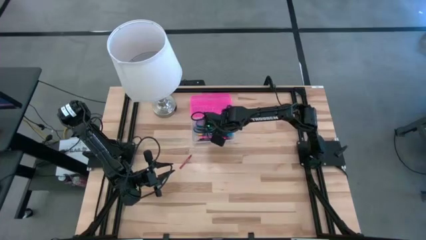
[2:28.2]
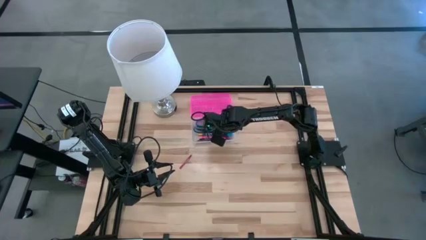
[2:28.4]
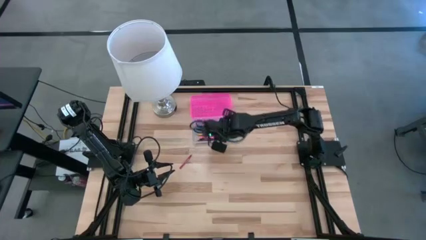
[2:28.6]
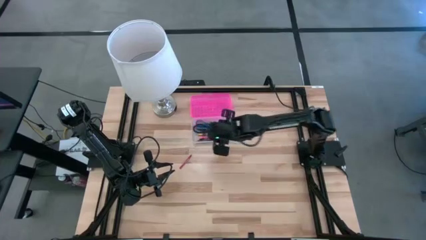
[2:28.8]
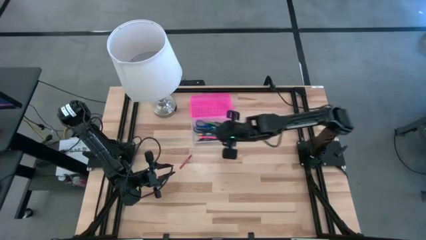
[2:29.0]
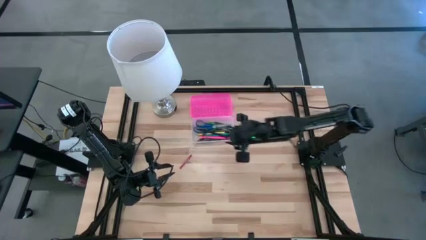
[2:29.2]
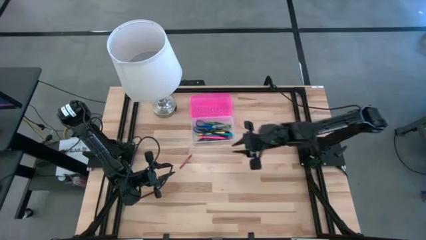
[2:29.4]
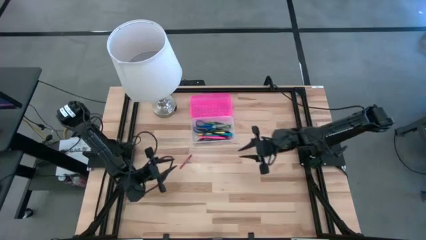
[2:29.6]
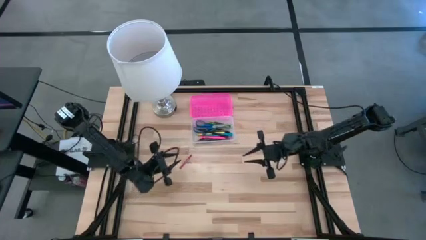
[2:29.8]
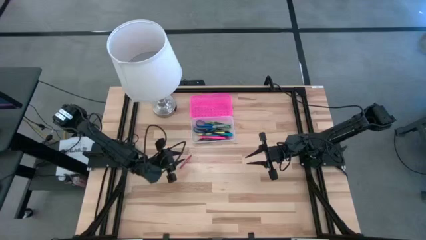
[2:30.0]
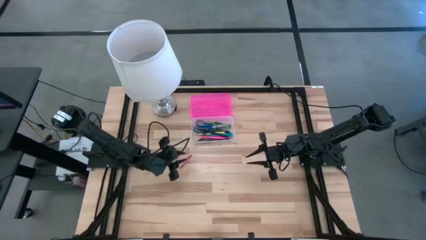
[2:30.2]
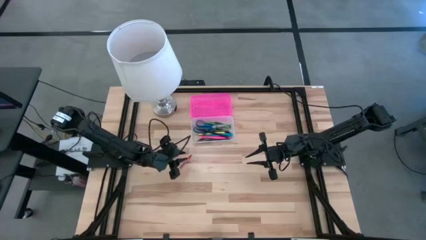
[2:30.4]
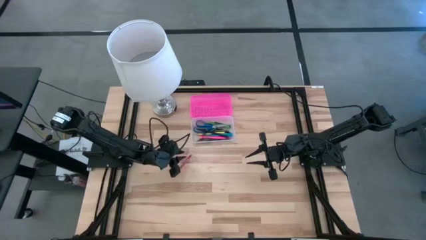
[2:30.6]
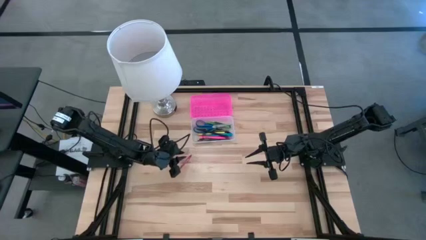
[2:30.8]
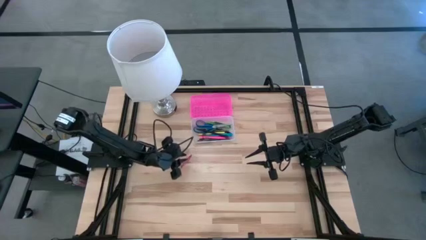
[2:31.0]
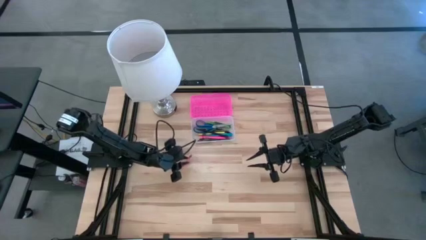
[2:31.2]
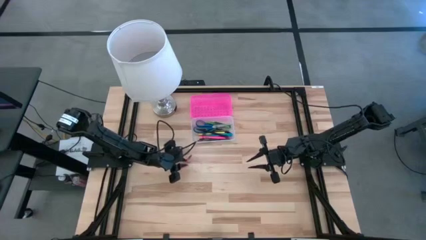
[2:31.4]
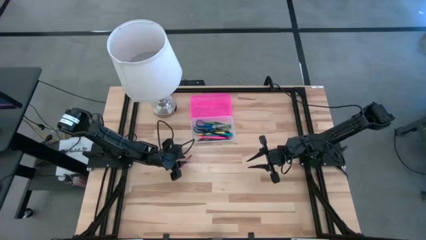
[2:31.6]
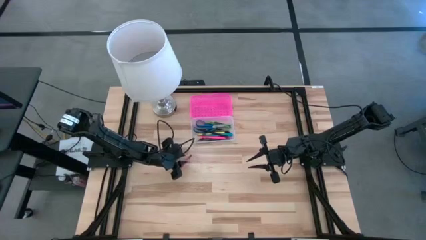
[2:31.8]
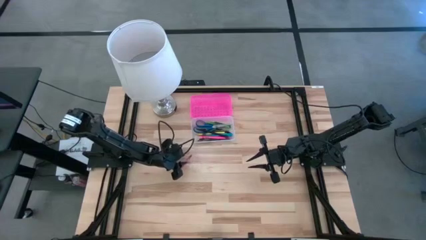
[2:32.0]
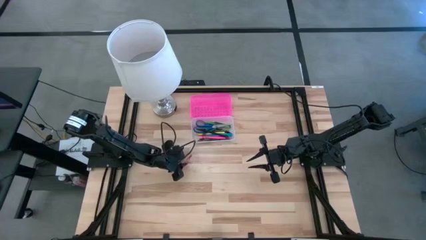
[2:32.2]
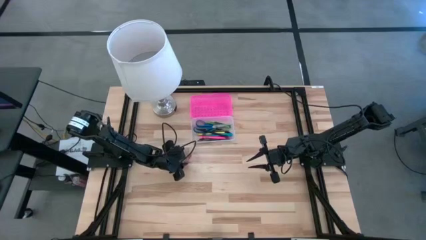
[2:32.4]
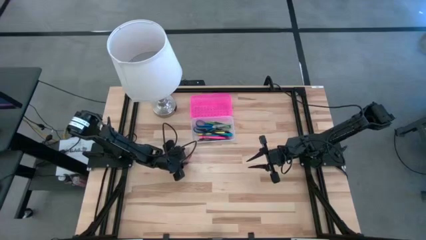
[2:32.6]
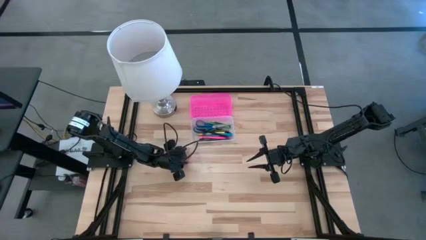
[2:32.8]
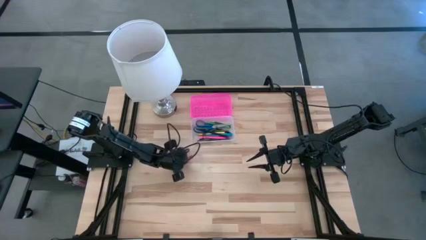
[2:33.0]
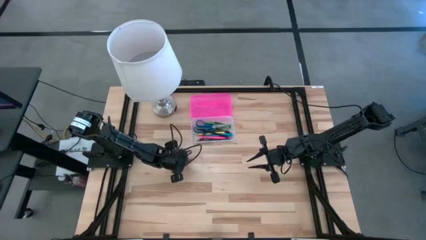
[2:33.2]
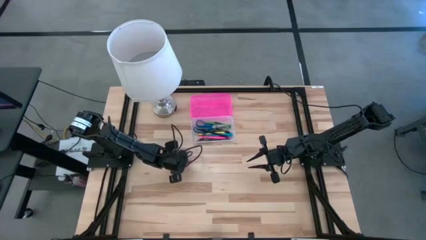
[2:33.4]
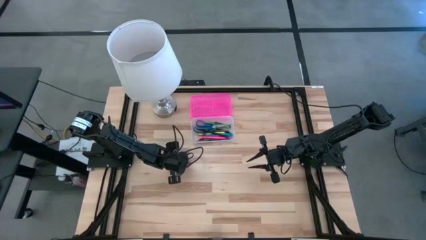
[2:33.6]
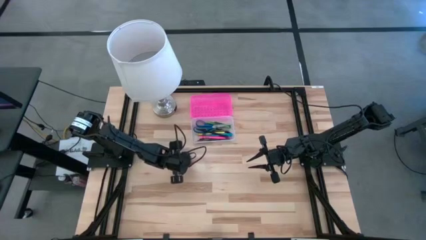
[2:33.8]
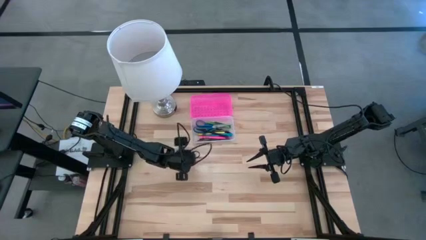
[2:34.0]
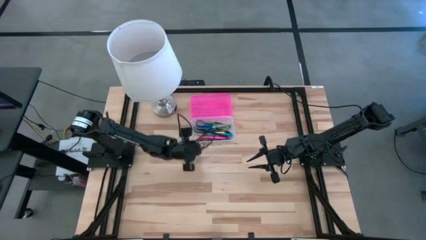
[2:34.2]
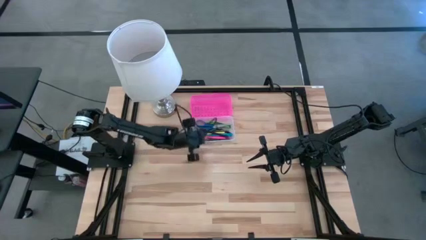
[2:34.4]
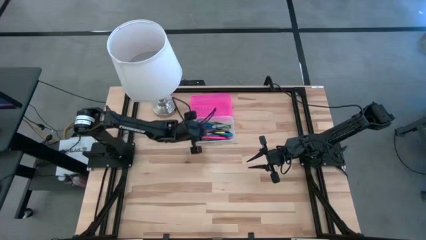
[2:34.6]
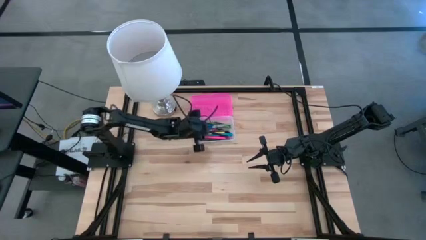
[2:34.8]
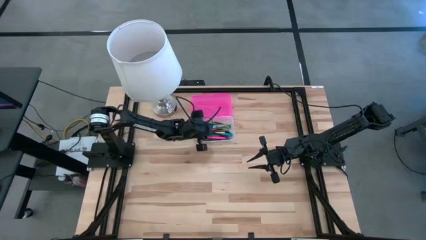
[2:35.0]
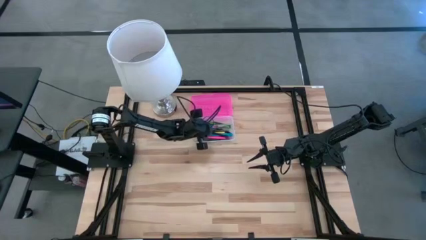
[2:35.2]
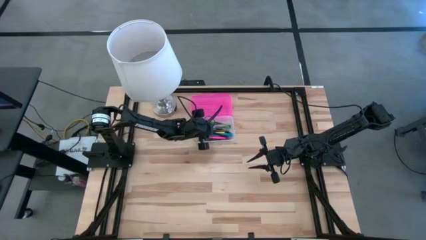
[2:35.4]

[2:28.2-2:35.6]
Task: Pick & place school supplies into a supply box
Put the red crayon into the pink supply box

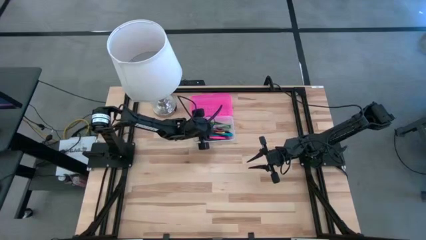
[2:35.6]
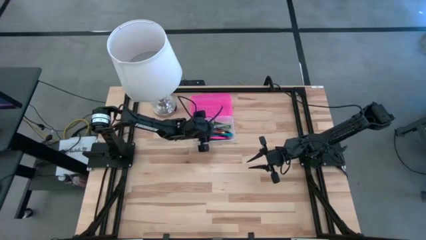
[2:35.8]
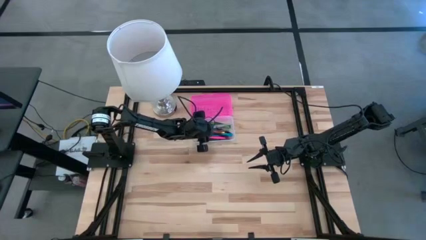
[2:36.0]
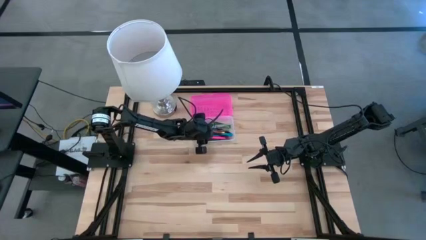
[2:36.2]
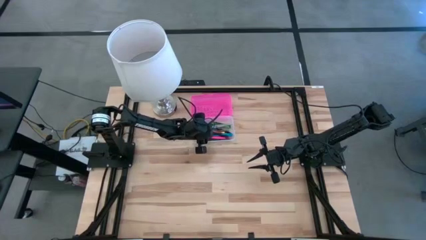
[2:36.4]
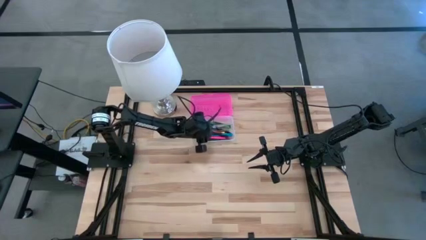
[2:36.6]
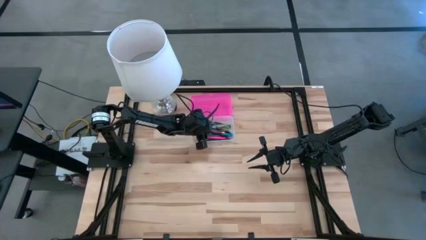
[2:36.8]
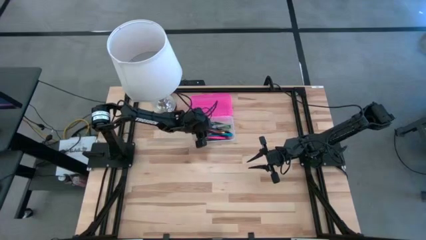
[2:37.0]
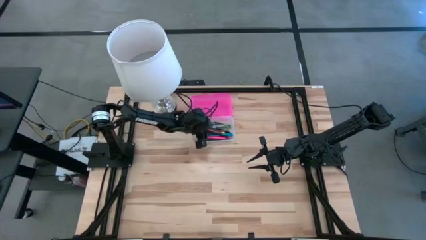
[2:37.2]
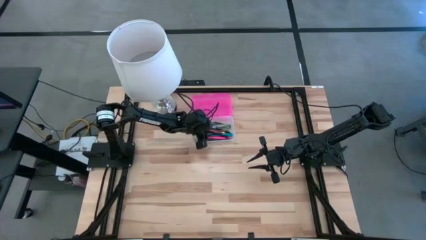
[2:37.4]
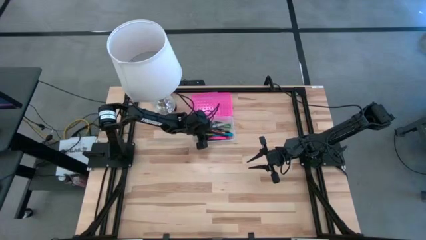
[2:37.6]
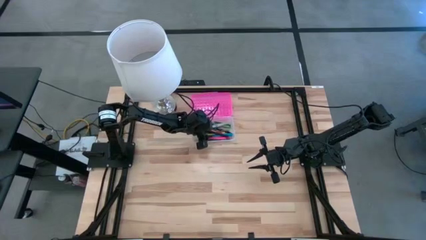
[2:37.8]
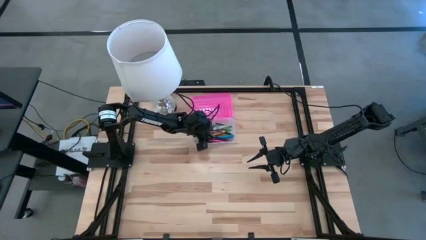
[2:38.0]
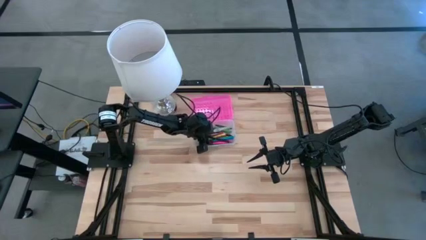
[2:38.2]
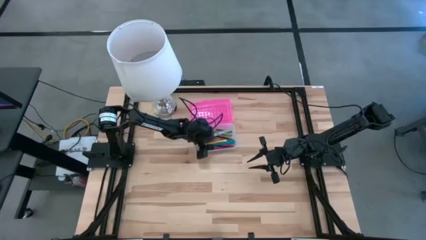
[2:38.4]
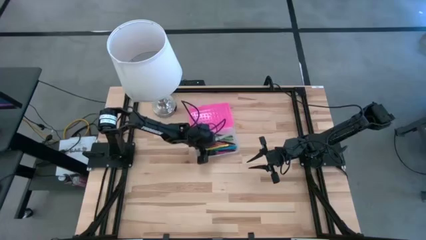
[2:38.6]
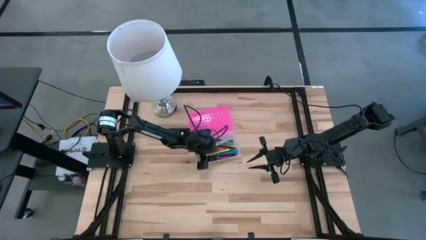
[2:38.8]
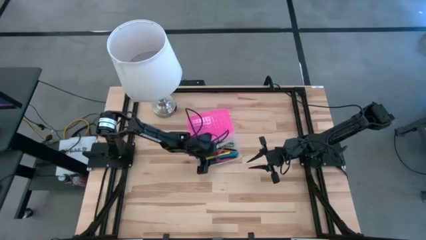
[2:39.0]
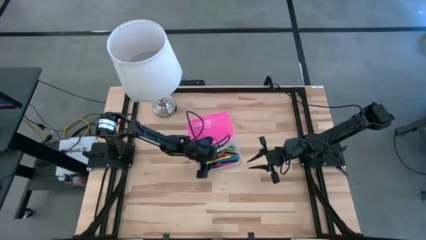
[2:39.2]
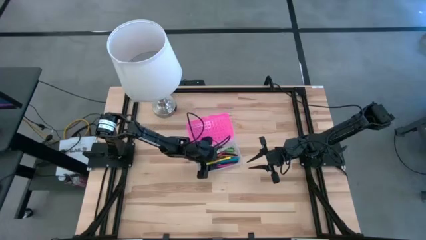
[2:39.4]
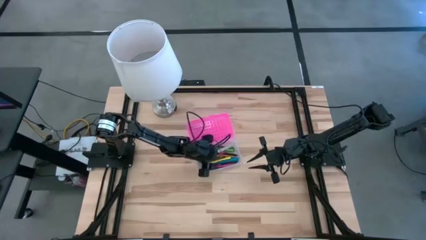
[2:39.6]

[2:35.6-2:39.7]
Move the pink supply box to the center of the table

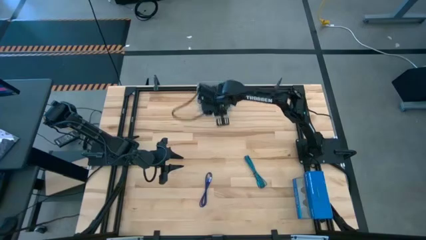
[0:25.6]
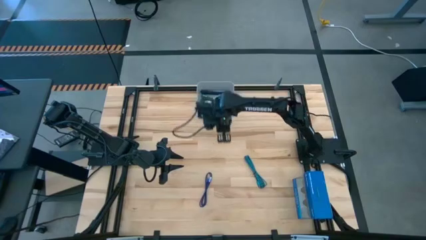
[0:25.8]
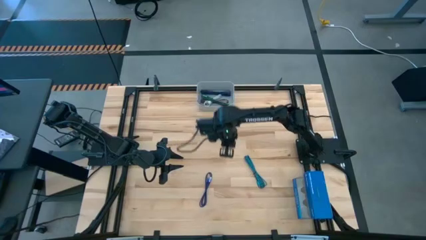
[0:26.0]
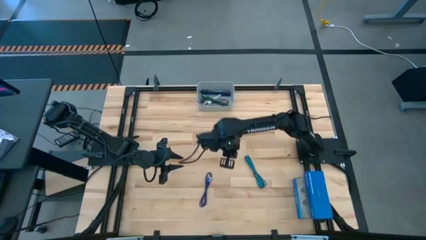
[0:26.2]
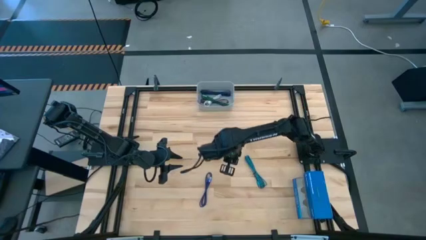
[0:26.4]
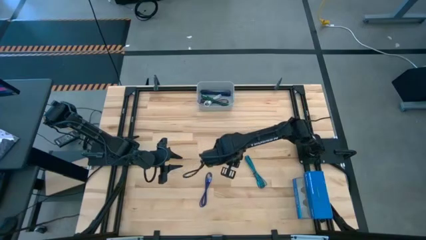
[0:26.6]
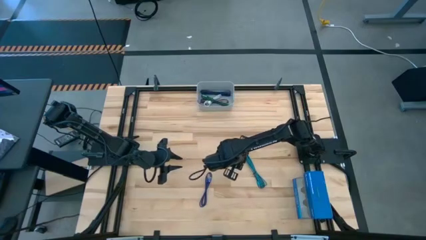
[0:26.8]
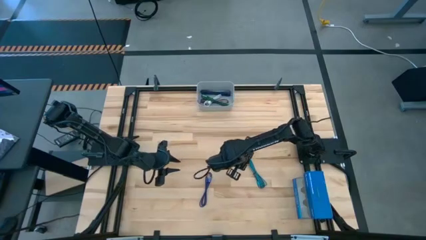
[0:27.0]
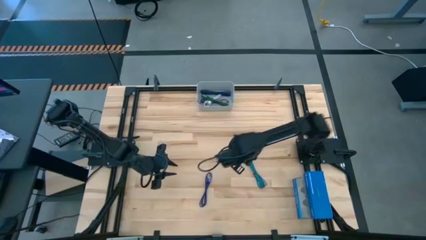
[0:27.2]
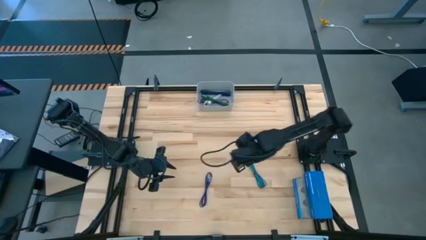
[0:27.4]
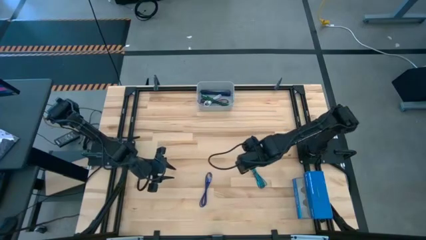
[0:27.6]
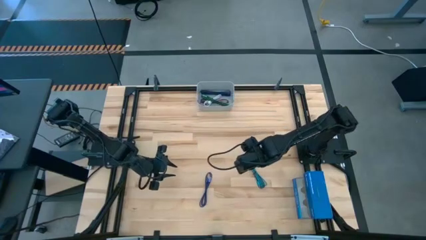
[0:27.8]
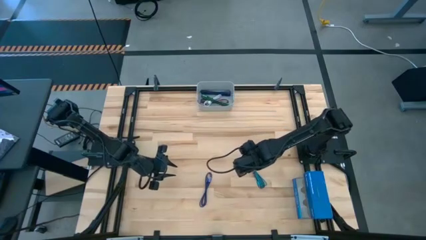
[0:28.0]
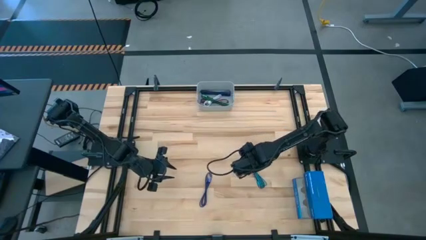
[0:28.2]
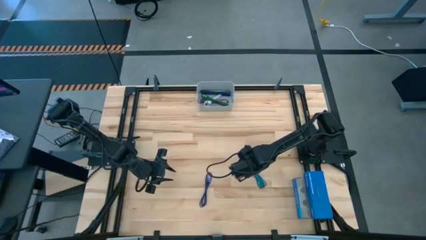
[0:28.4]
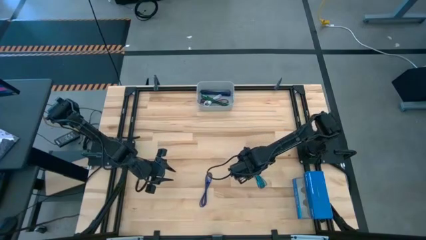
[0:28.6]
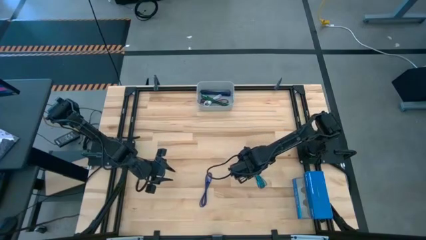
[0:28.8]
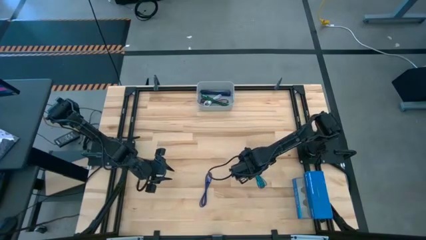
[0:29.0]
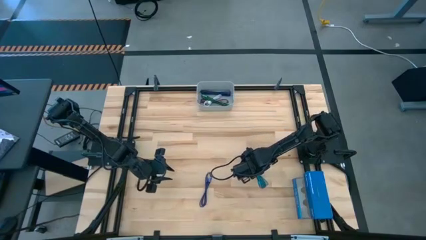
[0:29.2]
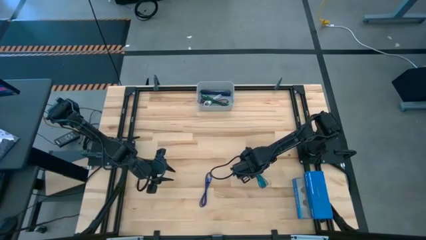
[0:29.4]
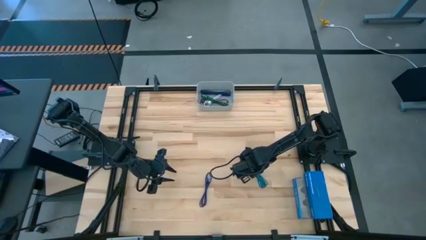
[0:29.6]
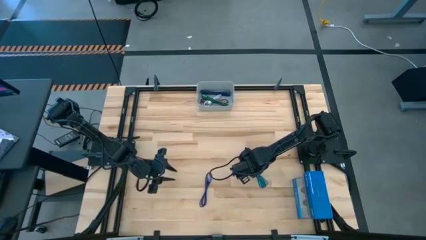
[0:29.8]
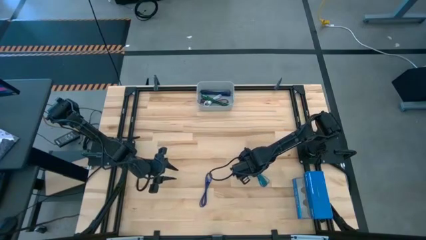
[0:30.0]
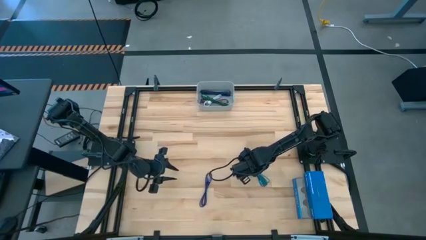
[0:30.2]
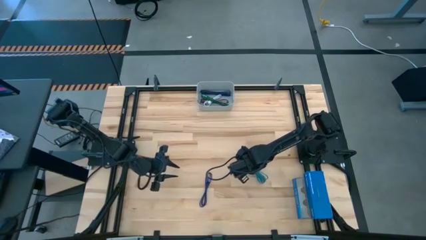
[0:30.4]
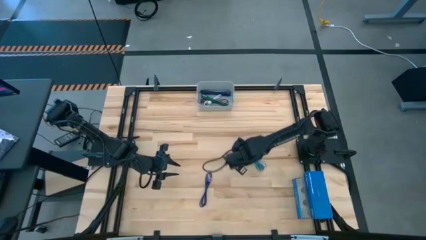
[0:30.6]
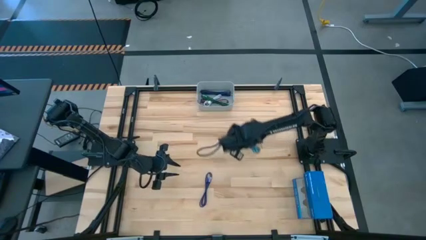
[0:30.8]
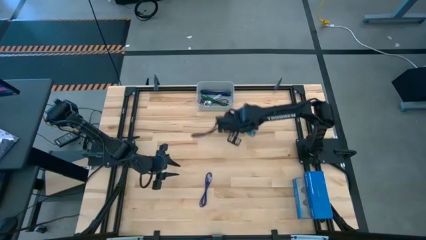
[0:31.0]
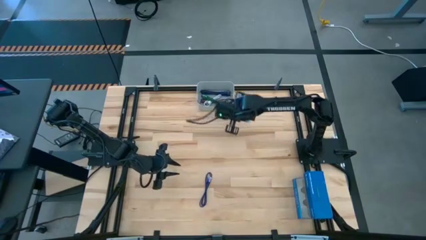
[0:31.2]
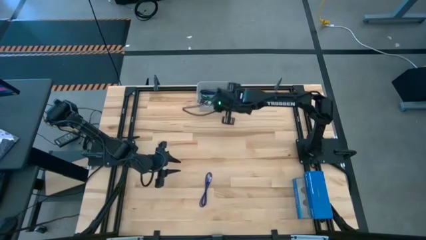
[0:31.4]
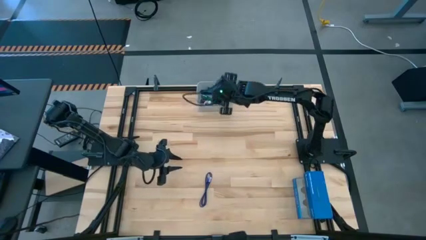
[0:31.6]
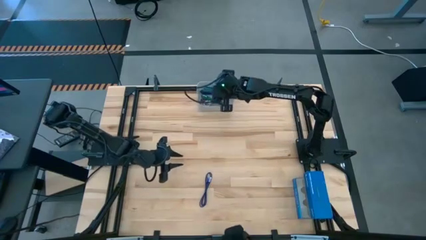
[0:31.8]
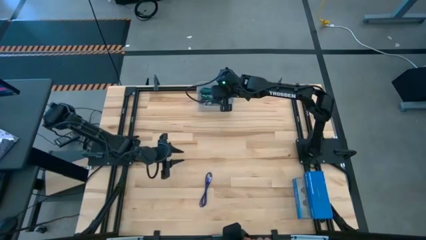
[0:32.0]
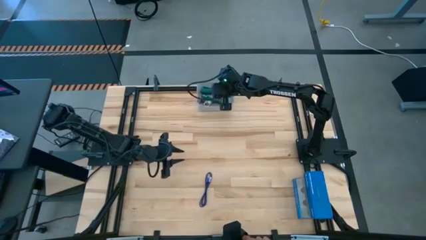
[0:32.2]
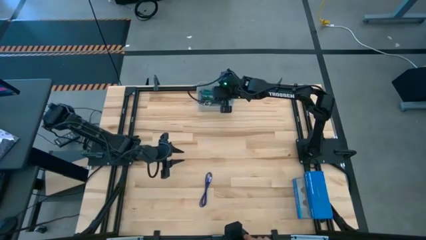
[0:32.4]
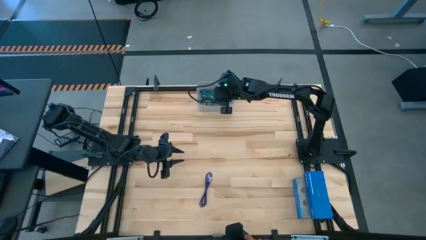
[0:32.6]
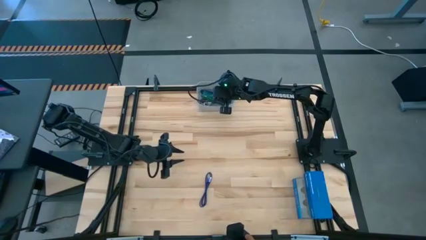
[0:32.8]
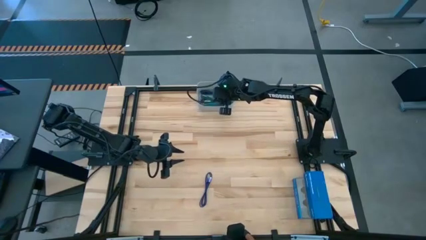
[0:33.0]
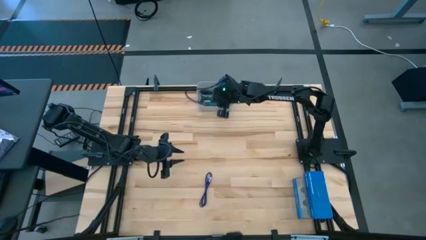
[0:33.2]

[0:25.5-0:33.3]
Task: Pick and place USB-C Cables
Put the blue charger cable into the gray bin
